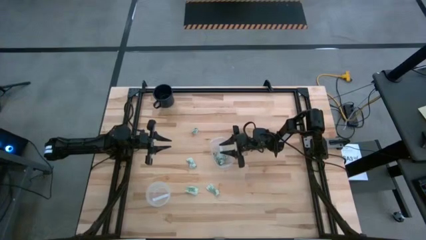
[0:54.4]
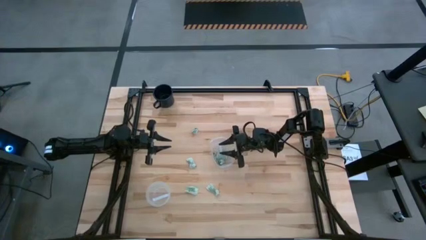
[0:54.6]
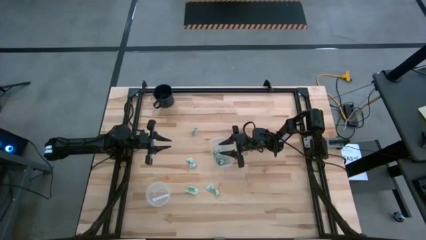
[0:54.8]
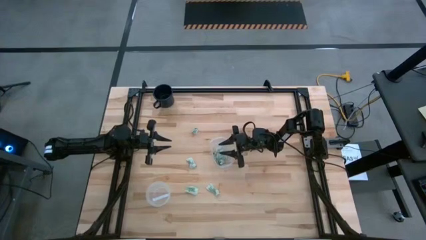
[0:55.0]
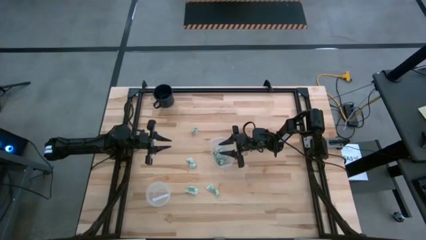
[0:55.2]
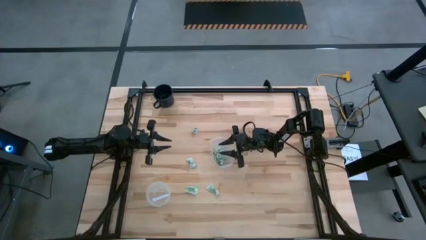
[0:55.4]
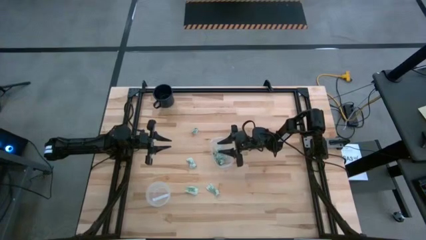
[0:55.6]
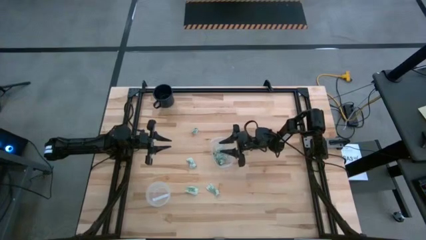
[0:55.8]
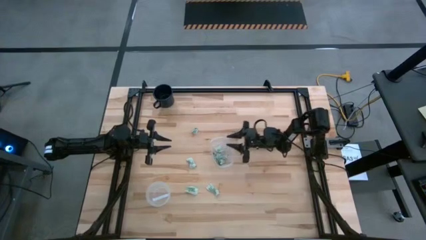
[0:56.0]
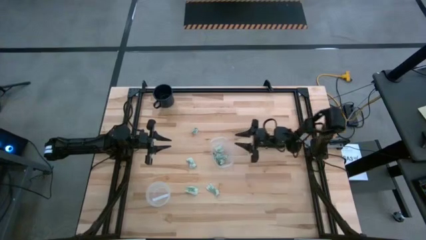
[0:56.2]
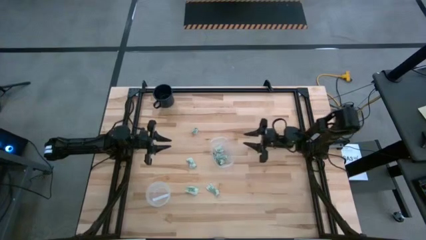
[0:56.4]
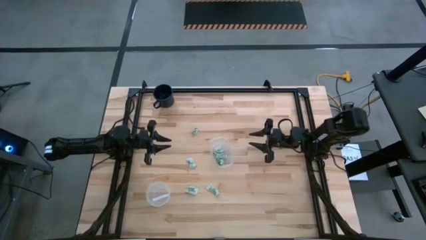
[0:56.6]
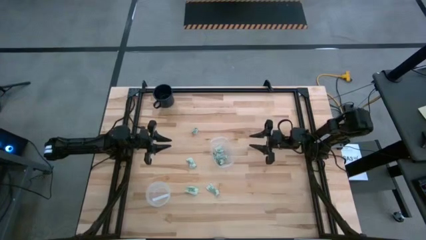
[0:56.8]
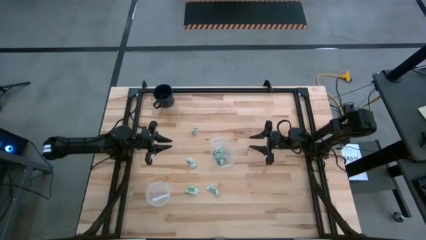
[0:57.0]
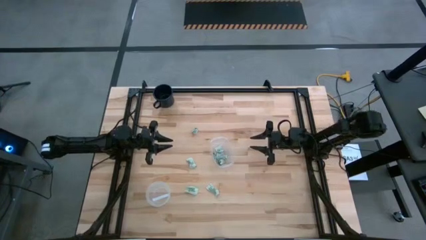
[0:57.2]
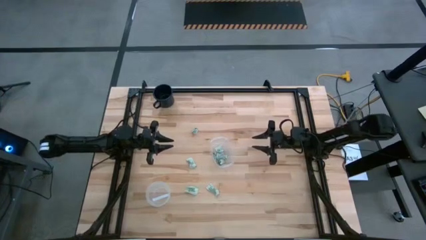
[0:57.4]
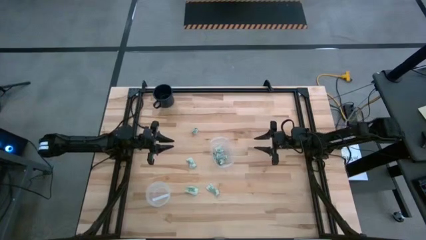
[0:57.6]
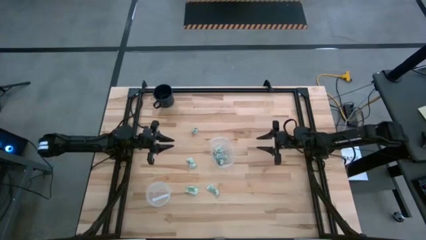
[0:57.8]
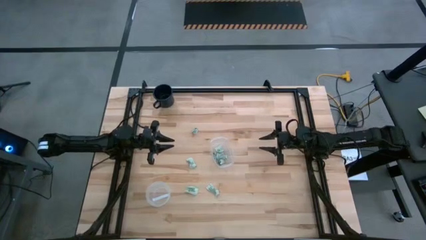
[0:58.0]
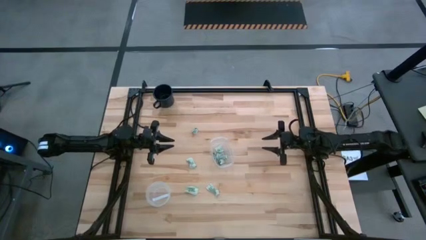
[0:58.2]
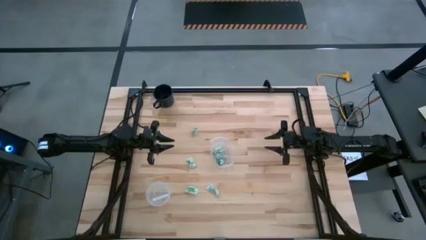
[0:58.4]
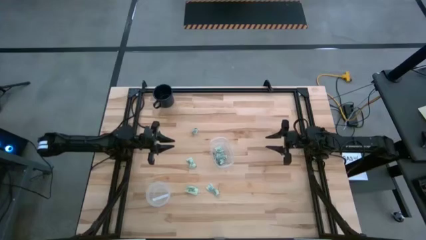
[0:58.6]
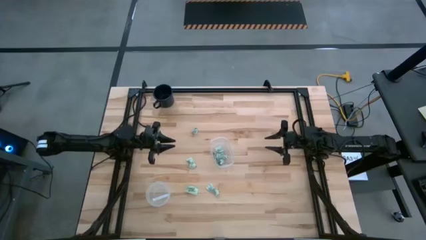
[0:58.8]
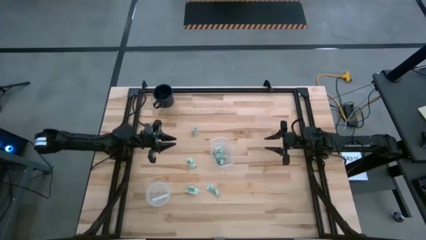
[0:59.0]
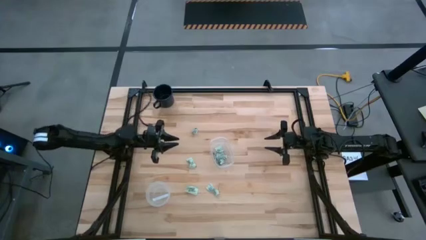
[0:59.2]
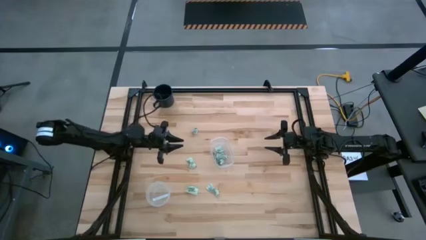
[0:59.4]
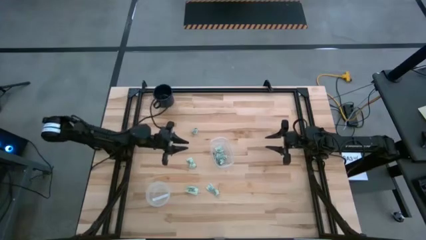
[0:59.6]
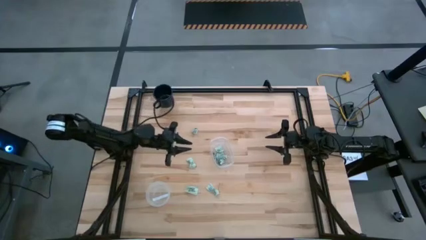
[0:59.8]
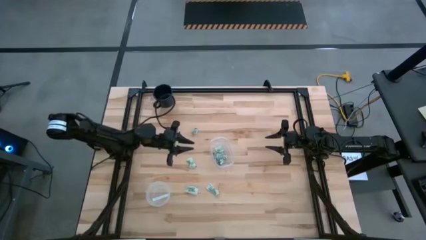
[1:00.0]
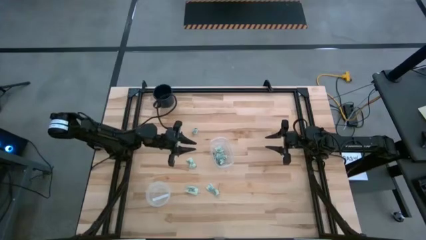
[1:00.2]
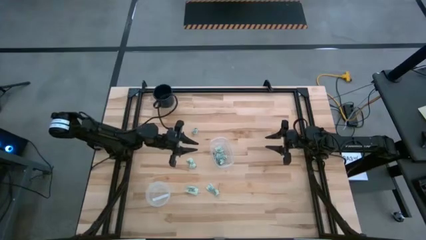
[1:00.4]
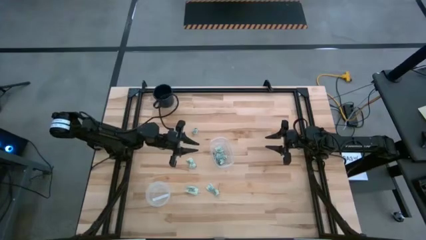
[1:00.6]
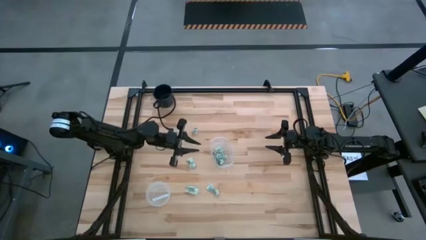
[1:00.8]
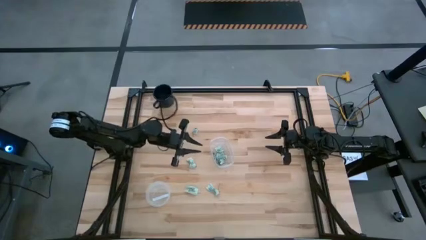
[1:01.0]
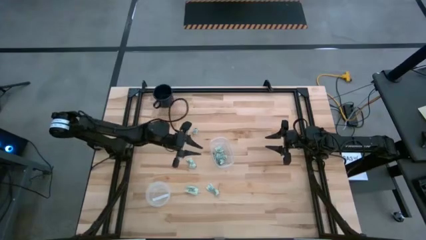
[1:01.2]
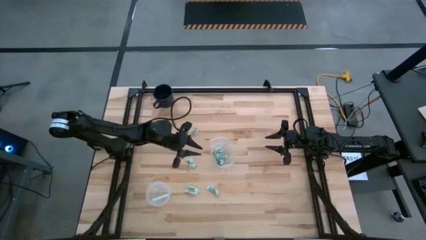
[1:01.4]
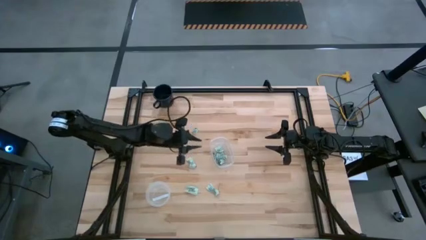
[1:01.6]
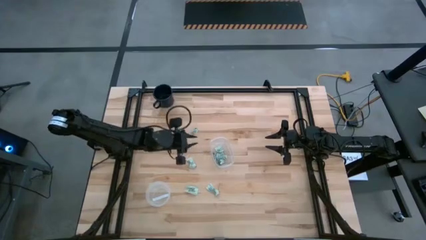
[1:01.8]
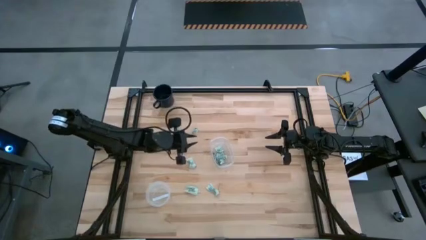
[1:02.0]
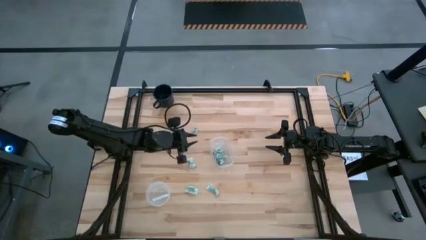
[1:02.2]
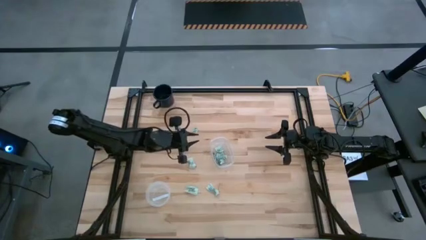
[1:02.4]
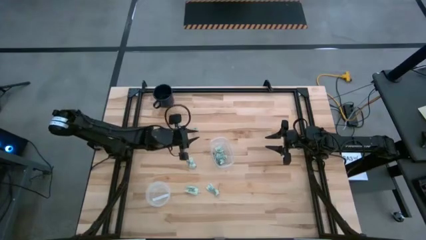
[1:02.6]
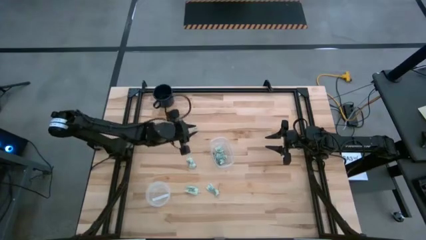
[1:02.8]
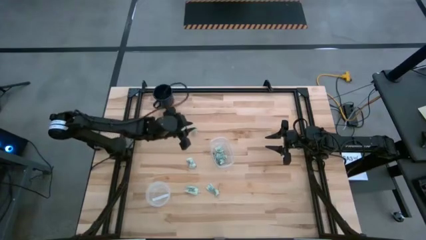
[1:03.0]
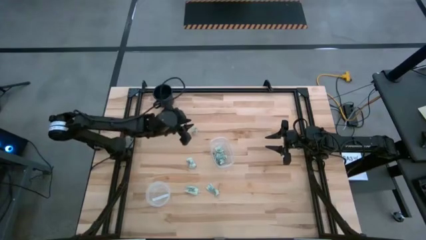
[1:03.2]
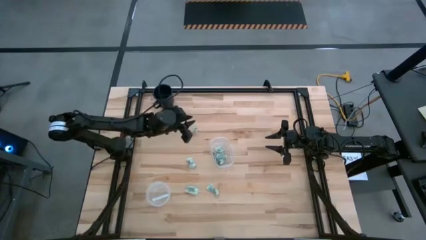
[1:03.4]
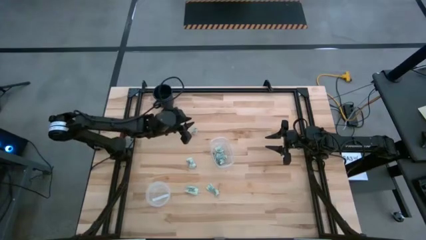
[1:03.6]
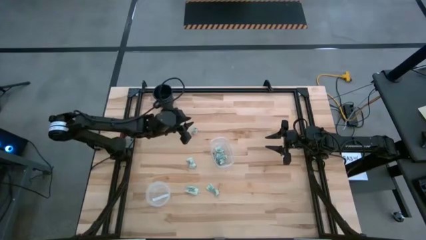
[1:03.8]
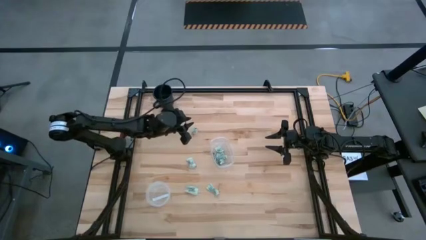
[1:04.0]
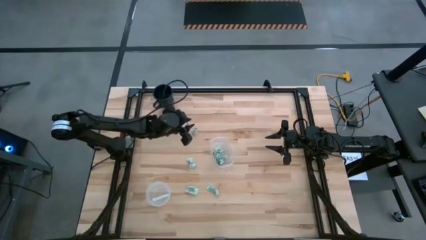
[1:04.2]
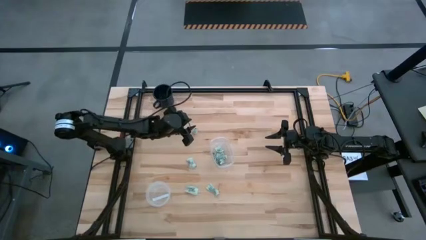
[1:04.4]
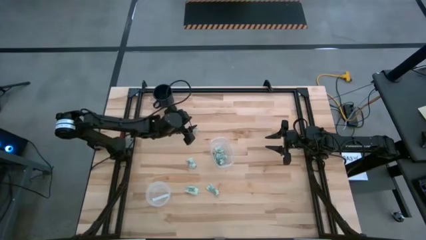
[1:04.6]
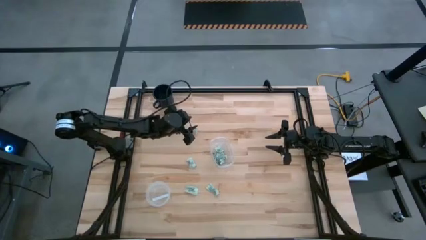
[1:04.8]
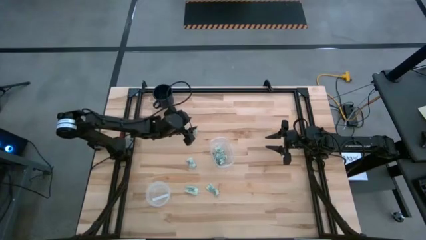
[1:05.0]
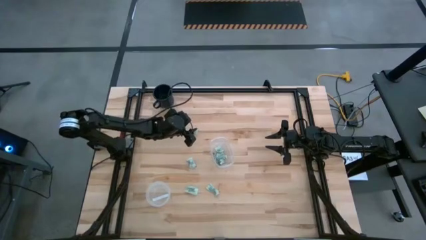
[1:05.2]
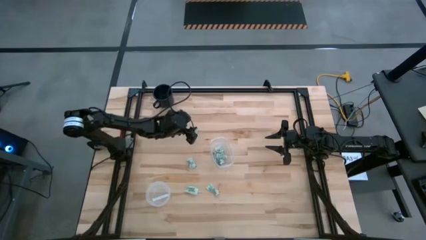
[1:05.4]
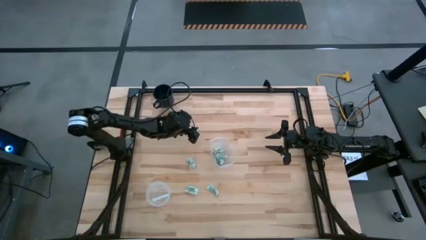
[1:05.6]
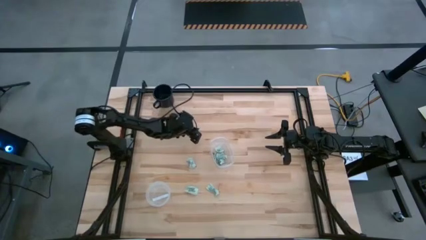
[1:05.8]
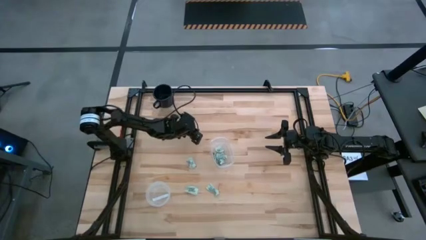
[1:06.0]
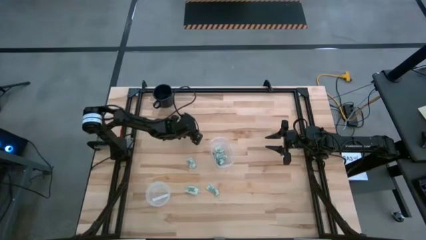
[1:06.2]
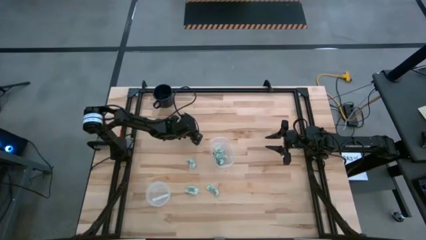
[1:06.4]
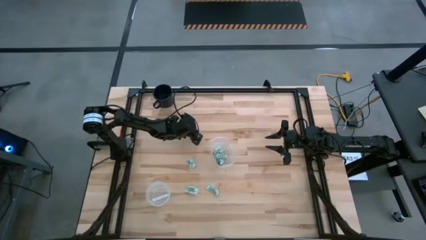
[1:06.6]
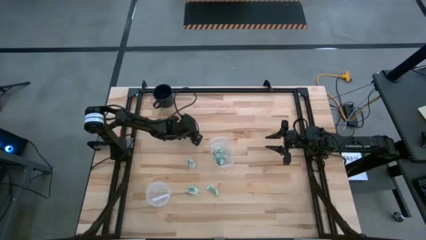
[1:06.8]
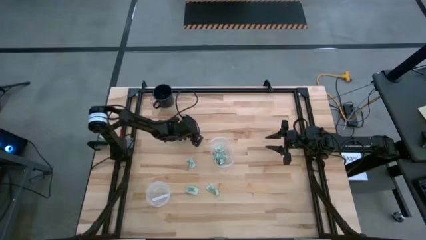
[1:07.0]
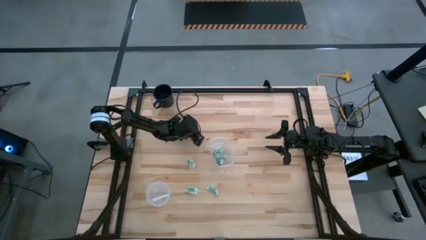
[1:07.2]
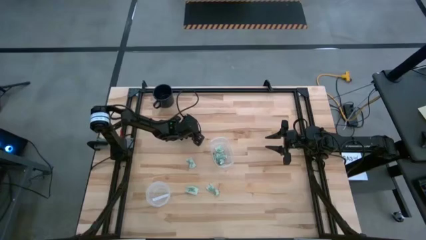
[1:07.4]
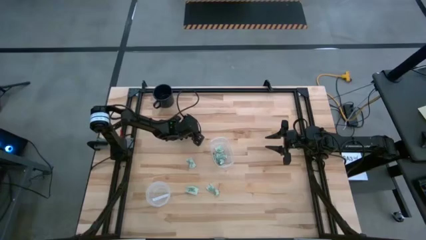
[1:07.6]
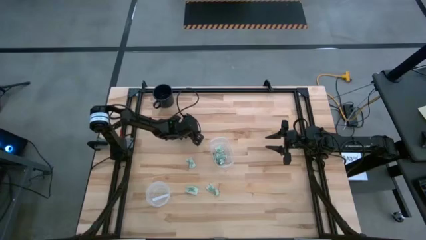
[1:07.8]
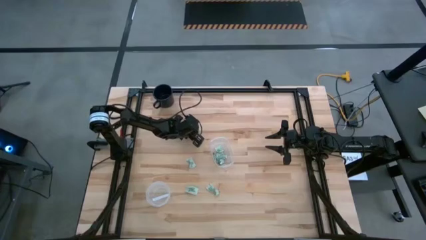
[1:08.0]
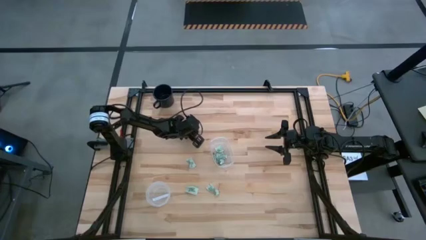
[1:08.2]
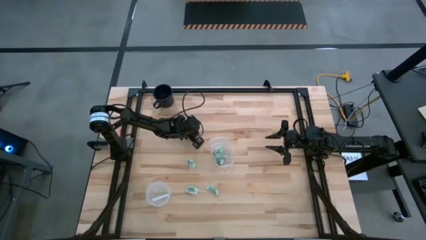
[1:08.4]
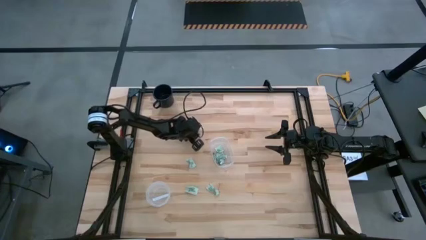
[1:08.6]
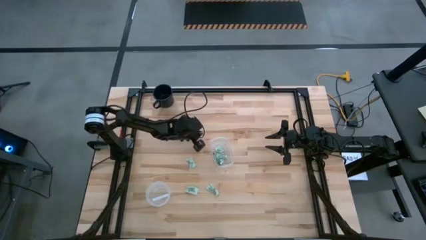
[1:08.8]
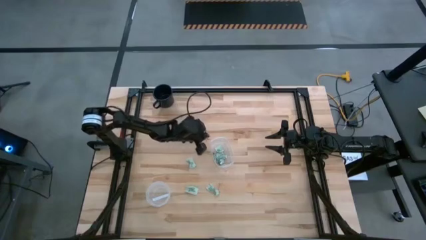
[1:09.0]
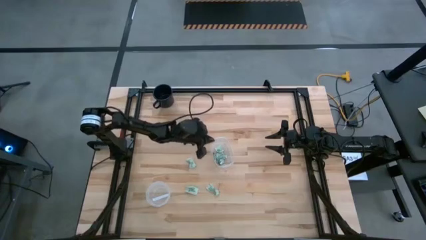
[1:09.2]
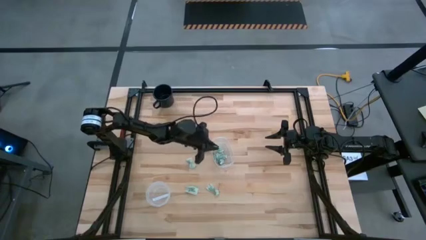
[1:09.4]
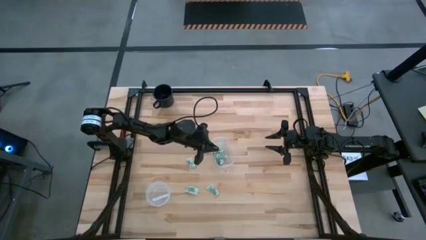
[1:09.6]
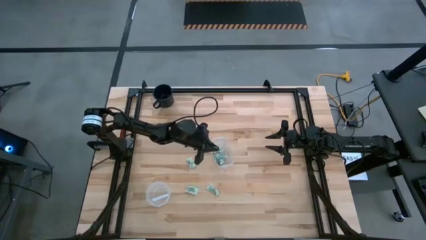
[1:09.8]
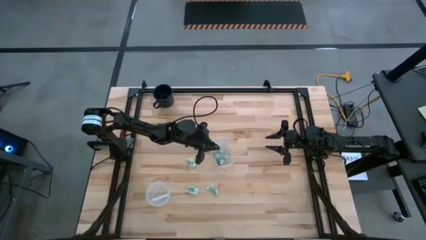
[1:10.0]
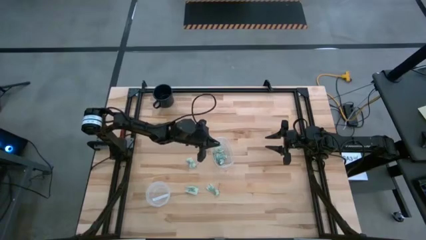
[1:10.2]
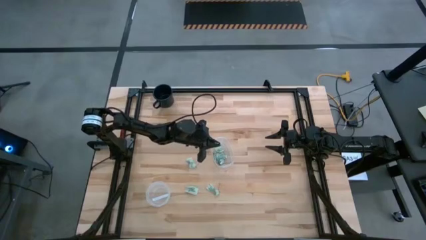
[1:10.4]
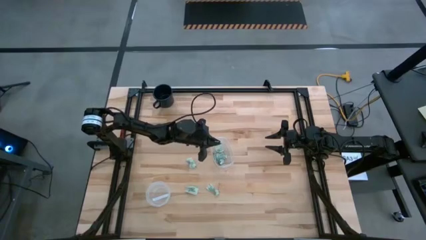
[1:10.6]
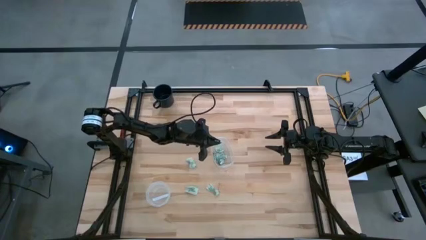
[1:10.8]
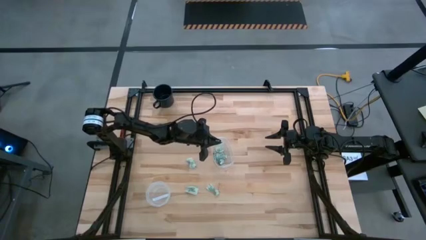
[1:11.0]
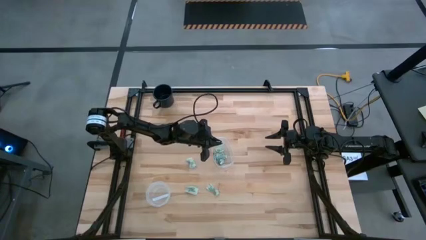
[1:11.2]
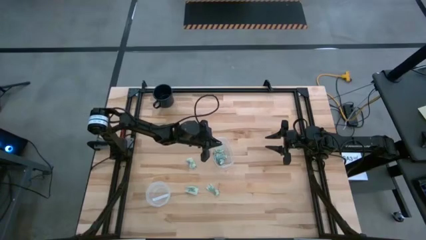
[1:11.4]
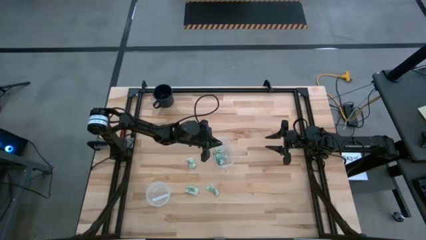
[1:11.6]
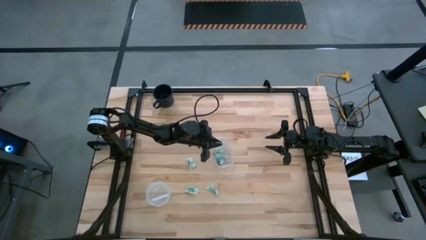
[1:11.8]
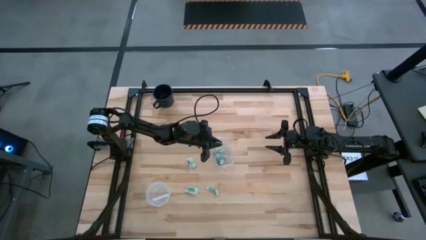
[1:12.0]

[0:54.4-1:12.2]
Task: Pick and place items into bin
Put the stevia packet into the transparent bin
